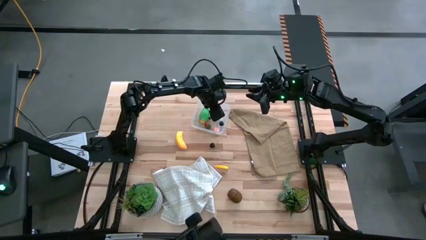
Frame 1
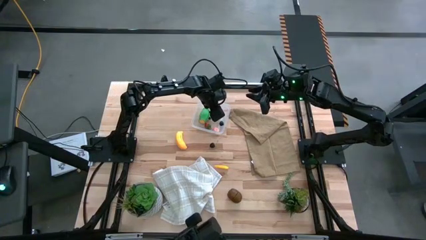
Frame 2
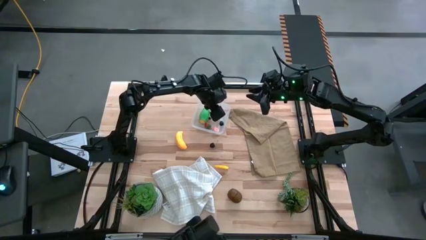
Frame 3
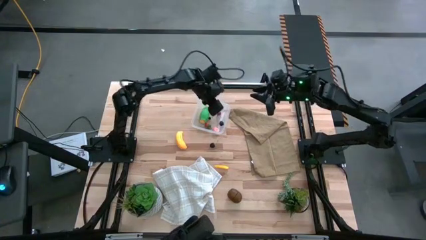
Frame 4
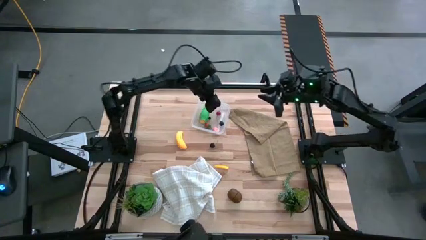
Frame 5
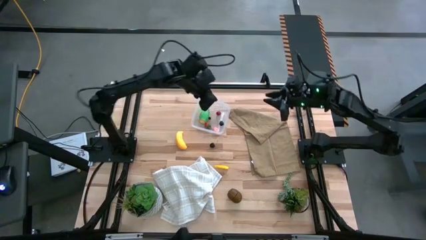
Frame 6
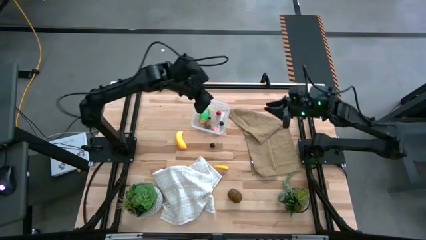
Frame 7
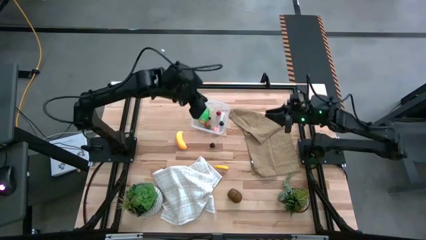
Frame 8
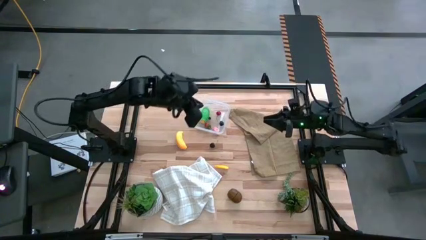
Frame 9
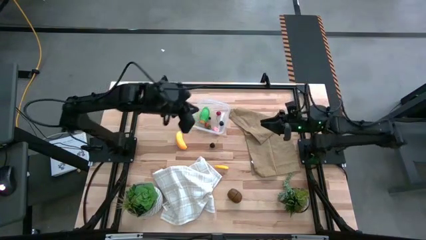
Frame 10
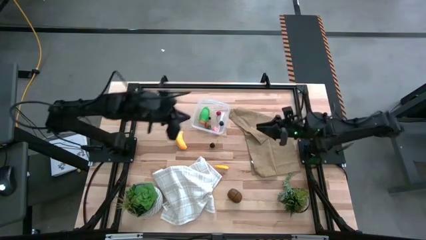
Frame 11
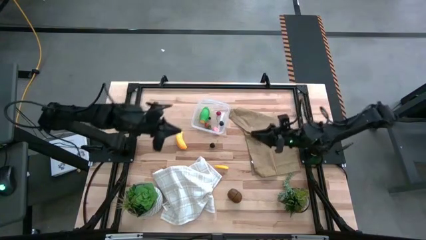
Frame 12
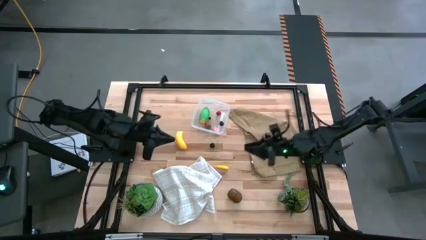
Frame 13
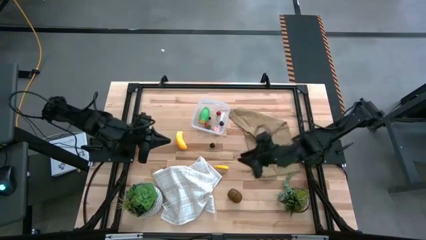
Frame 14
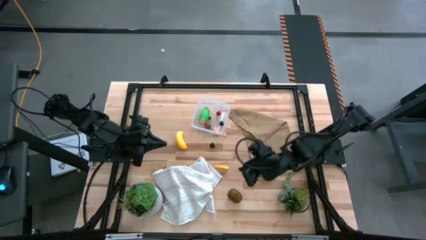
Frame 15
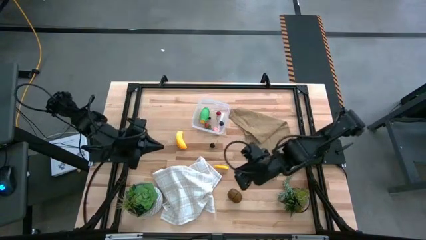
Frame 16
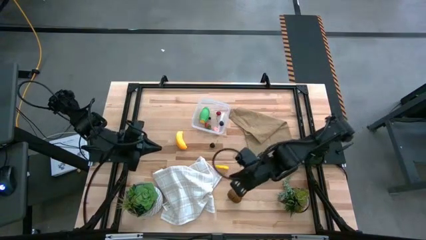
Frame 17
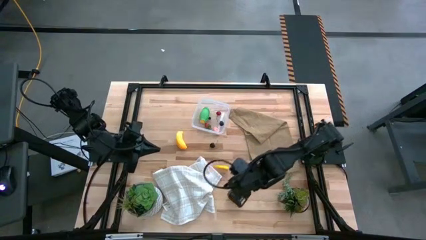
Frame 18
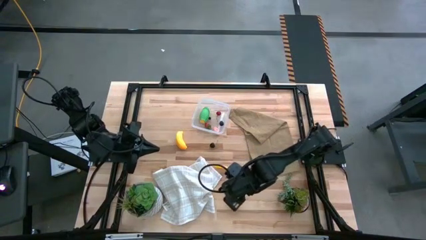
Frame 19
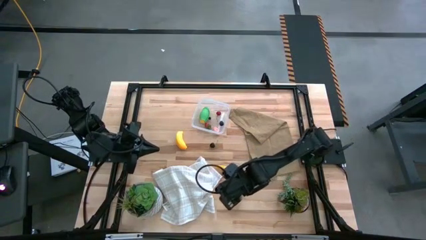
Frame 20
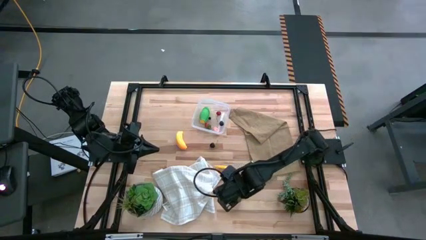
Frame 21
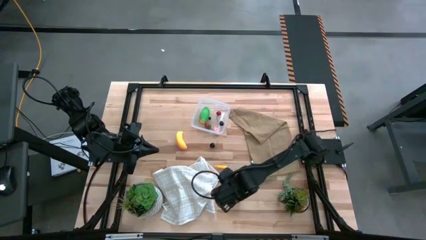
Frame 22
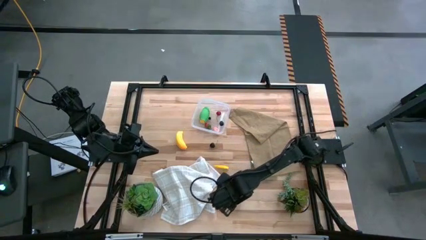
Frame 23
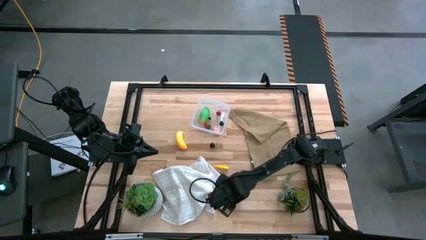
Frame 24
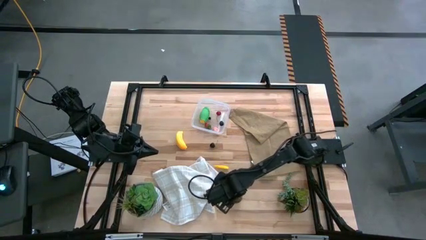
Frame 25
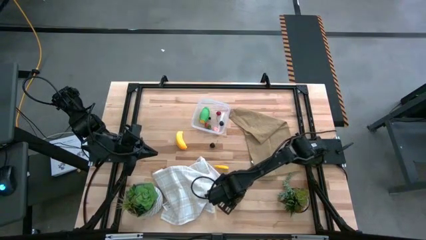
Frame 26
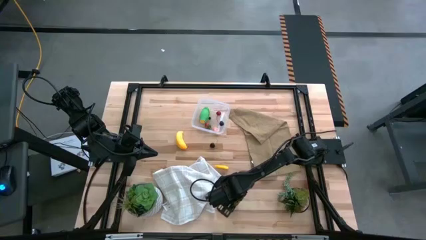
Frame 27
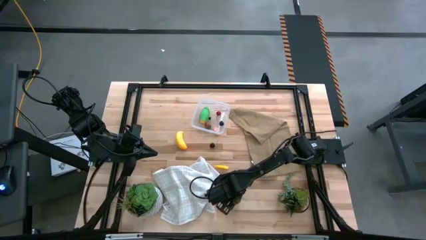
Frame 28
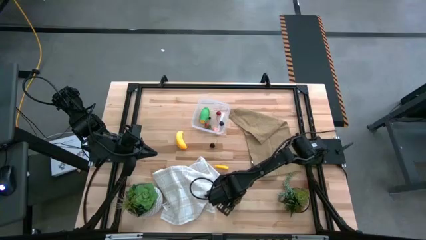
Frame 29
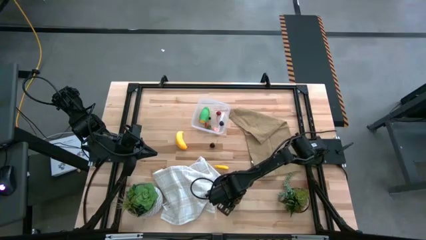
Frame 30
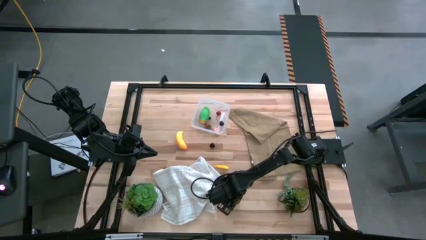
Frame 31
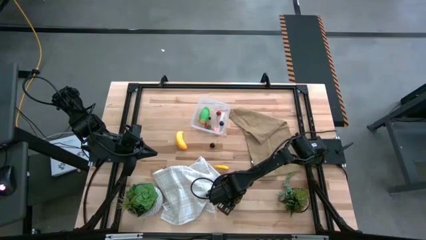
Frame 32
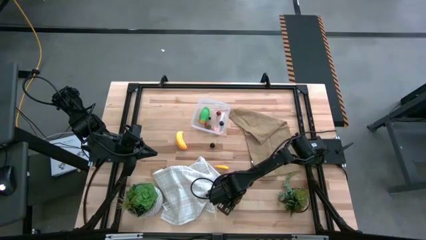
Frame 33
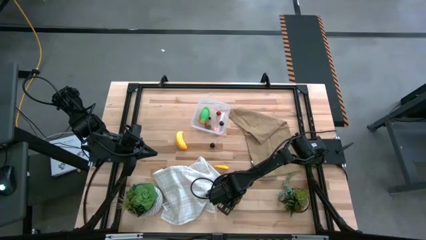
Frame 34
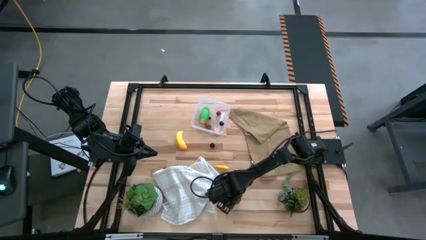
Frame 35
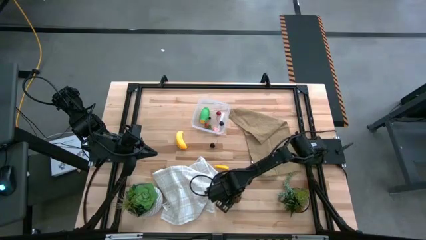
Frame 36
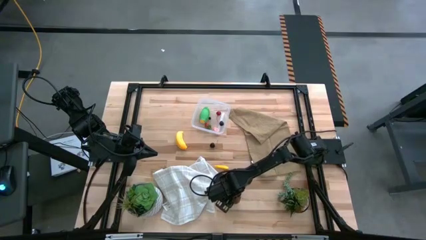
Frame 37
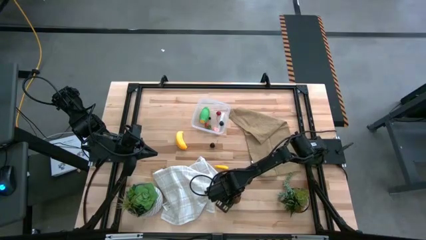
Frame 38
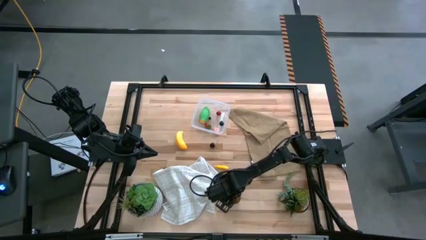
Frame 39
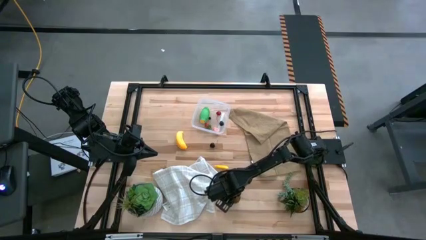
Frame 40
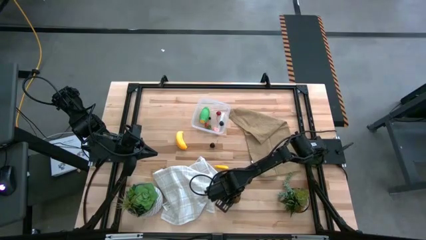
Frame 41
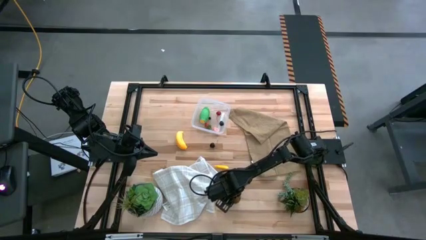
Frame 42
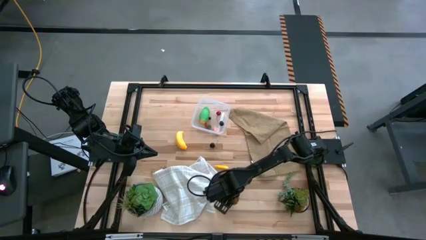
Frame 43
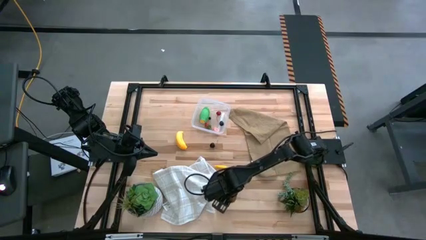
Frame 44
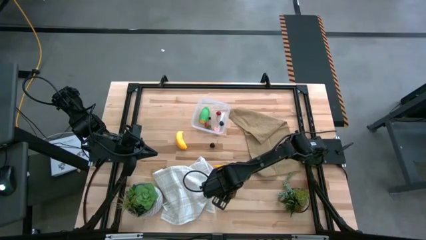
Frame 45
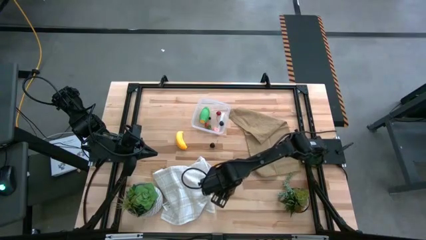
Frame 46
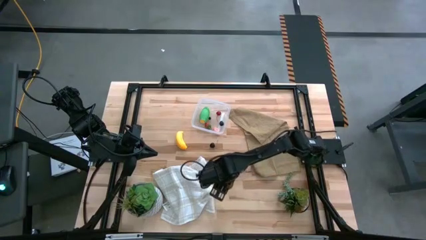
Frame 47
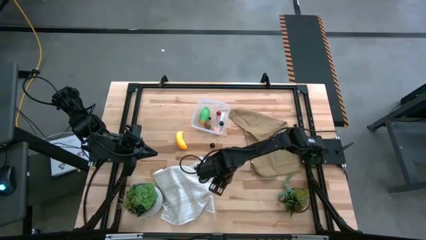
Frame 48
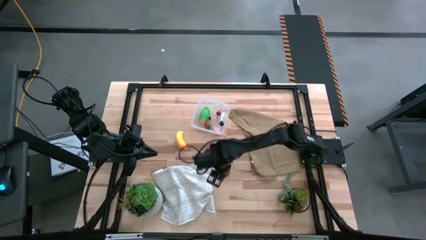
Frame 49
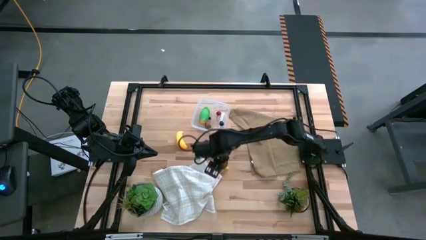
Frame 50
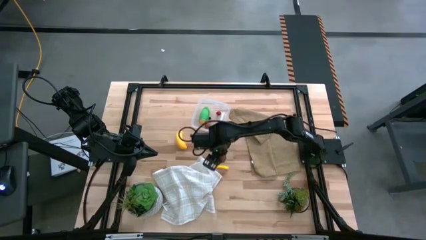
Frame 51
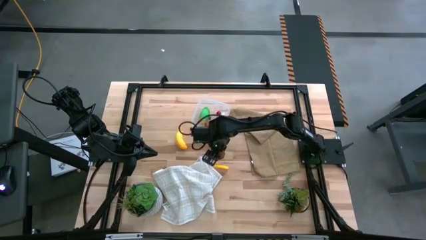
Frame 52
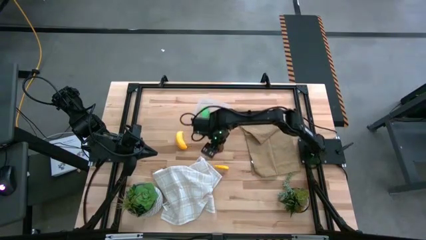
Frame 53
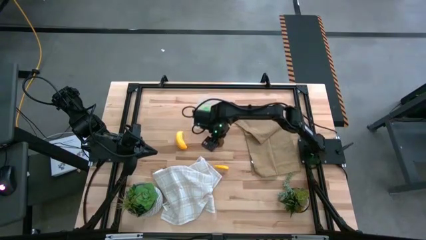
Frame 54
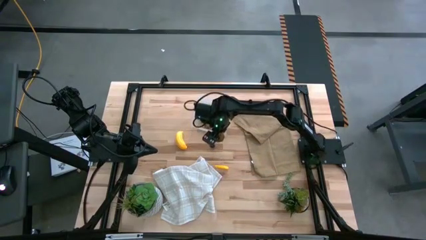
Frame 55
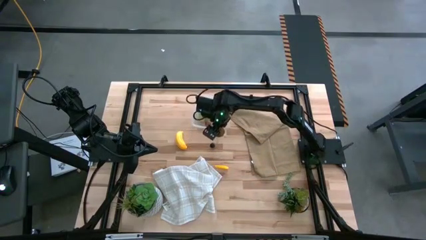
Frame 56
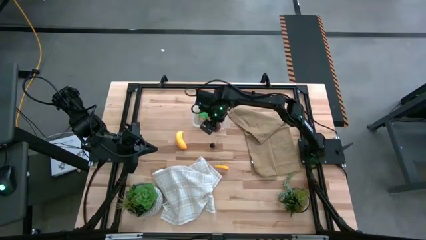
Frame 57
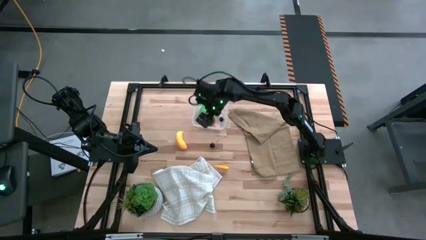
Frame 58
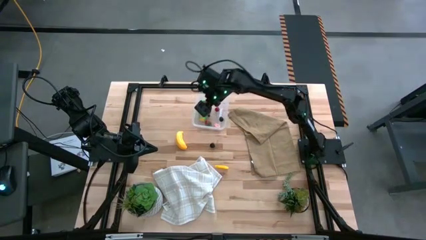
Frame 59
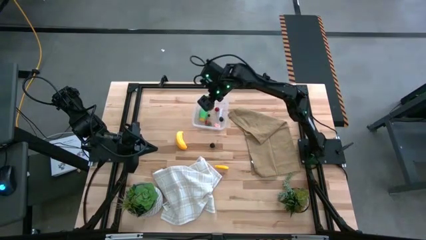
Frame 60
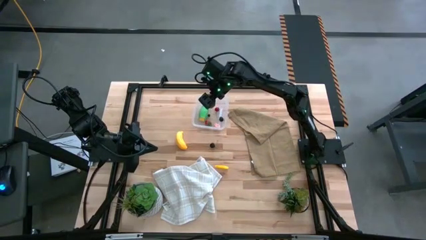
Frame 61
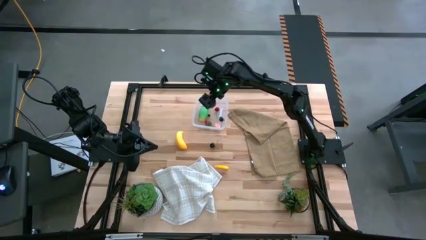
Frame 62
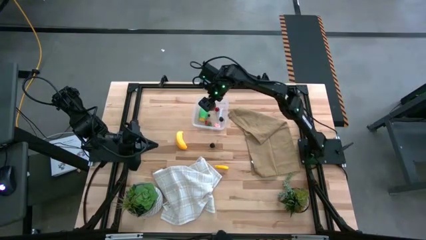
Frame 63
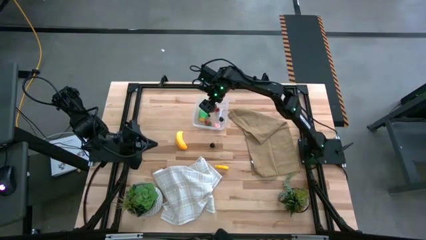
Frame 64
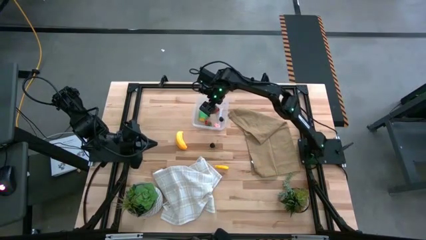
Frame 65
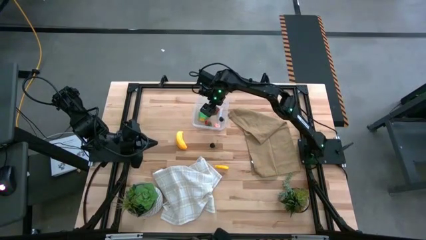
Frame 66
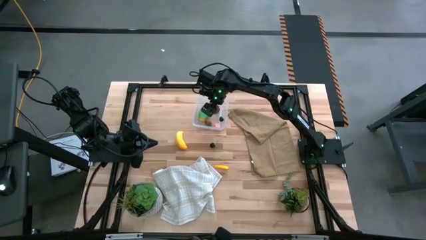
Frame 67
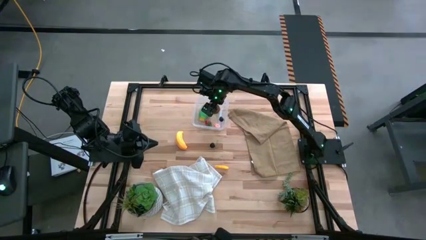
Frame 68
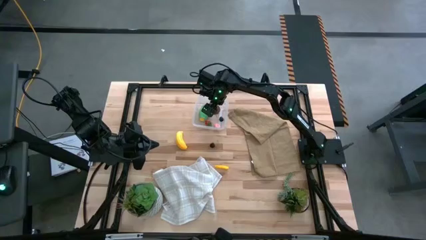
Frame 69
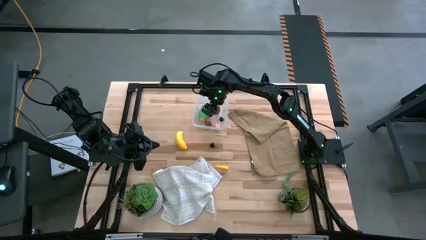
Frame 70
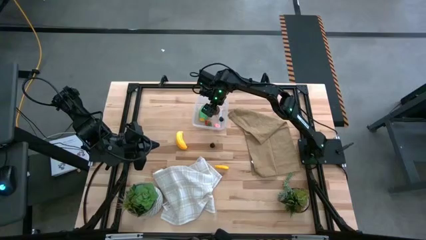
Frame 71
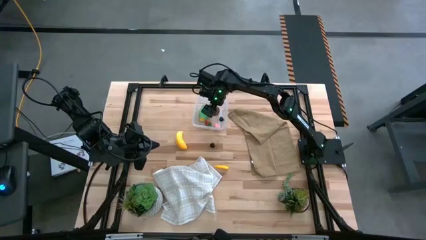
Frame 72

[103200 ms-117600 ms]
Task: Pick and placing Produce into tupperware
Put the brown kiwi into the transparent bin

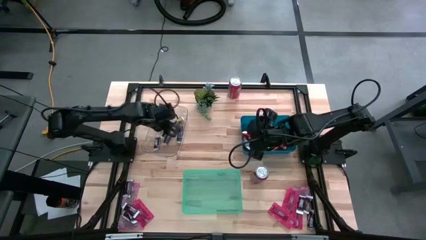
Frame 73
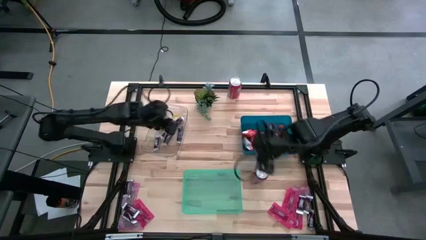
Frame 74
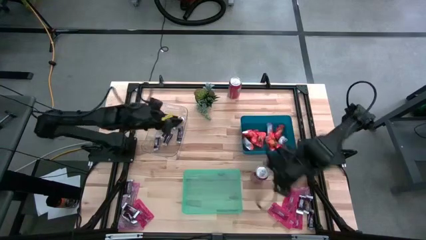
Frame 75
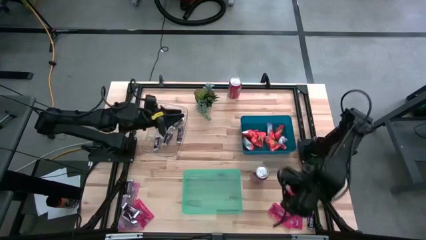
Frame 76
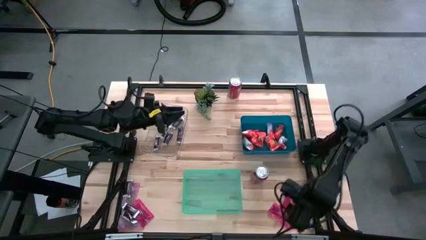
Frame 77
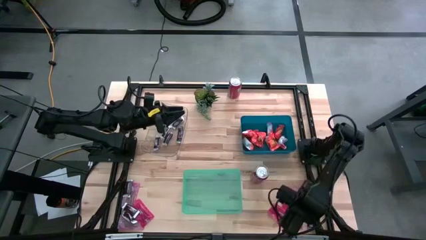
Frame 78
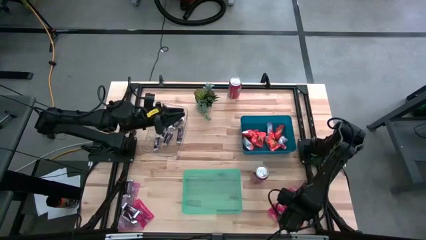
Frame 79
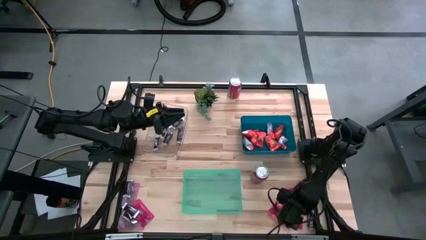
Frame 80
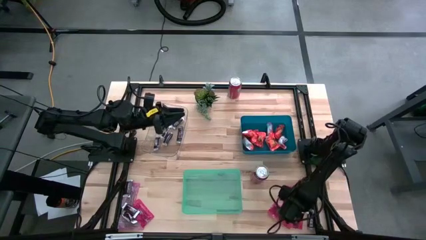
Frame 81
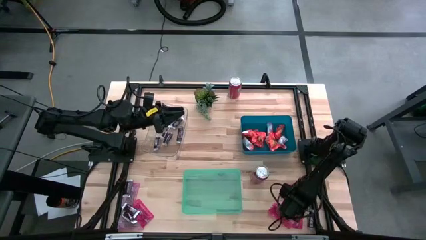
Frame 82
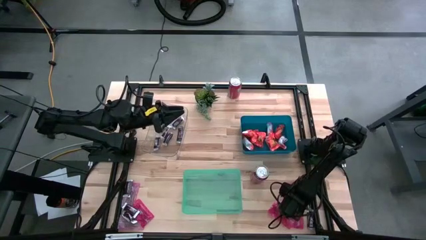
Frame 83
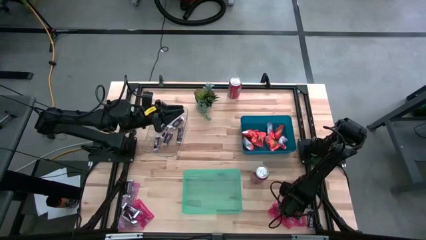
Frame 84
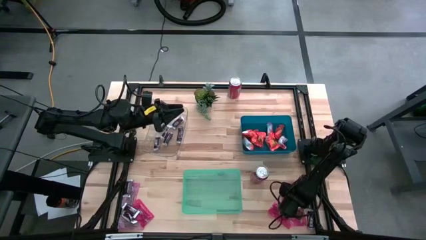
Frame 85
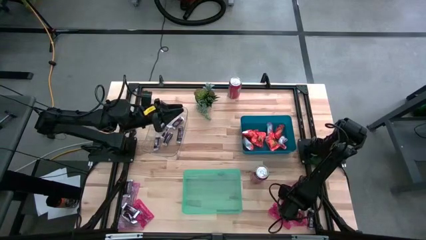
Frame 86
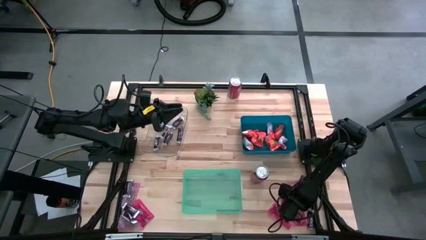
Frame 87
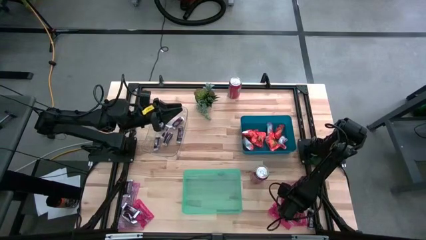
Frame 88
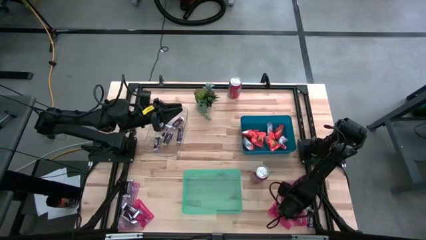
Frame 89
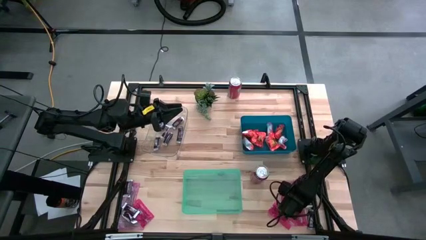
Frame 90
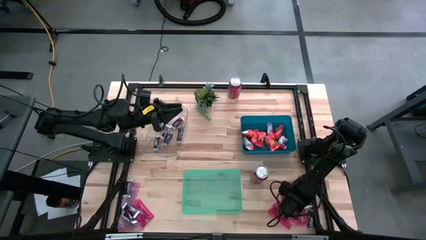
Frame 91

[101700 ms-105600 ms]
Task: Sort candy
Put the brown chocolate bar into the transparent bin
